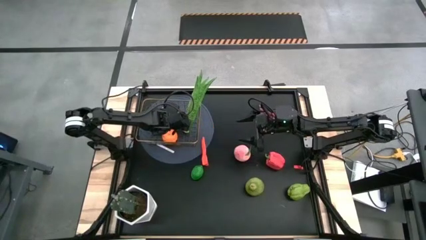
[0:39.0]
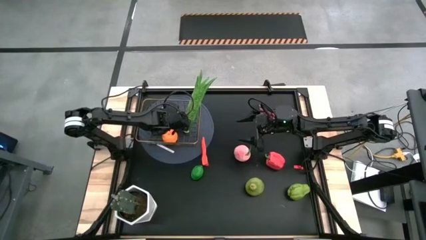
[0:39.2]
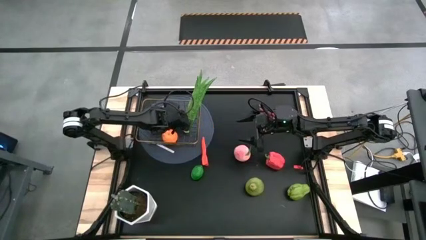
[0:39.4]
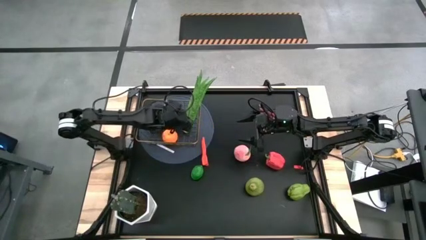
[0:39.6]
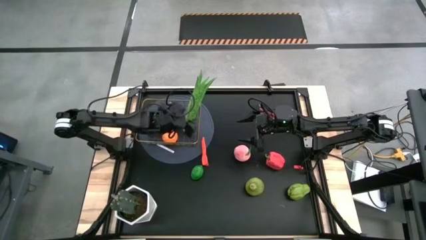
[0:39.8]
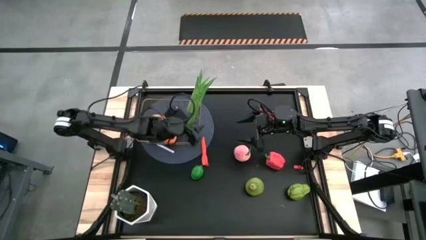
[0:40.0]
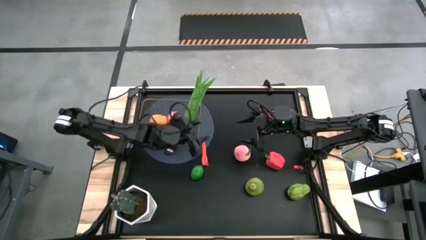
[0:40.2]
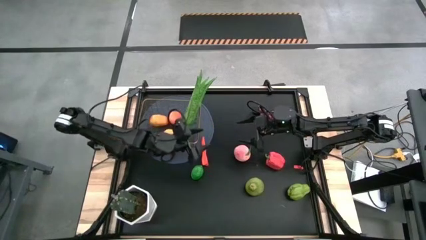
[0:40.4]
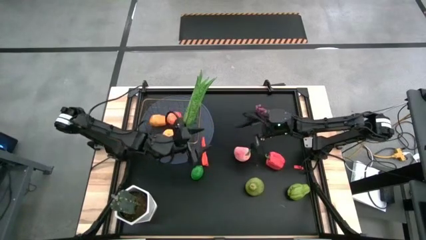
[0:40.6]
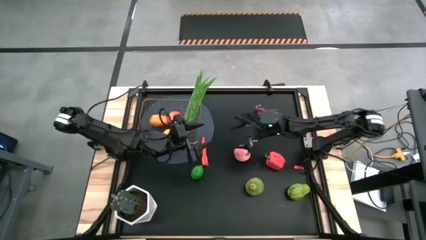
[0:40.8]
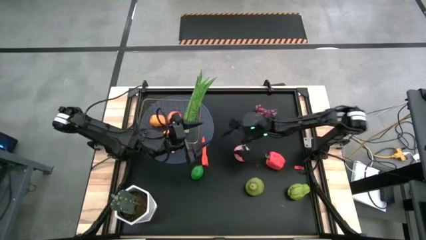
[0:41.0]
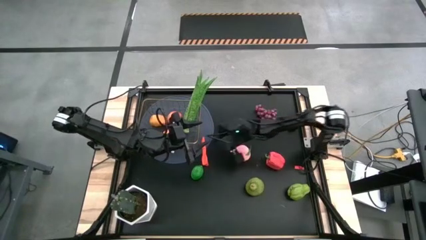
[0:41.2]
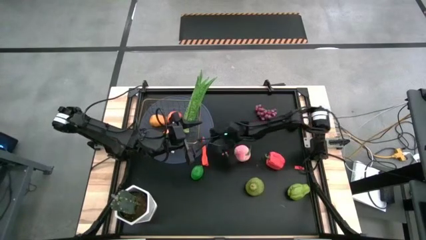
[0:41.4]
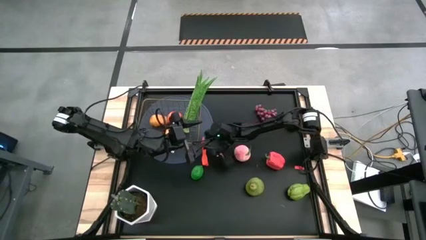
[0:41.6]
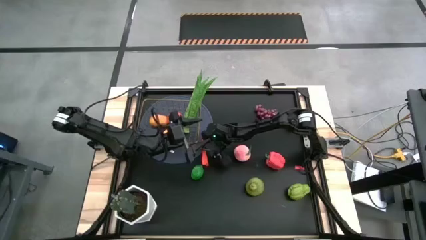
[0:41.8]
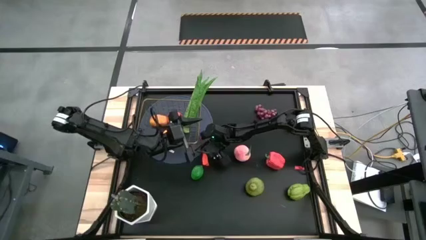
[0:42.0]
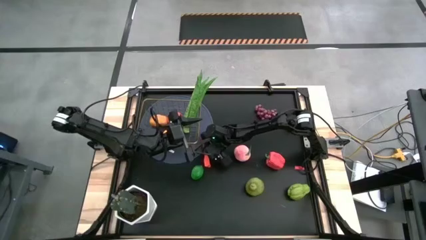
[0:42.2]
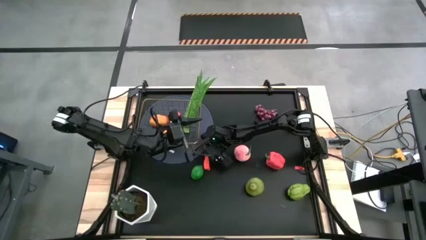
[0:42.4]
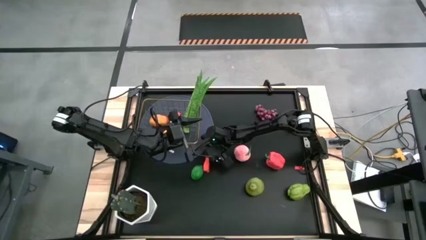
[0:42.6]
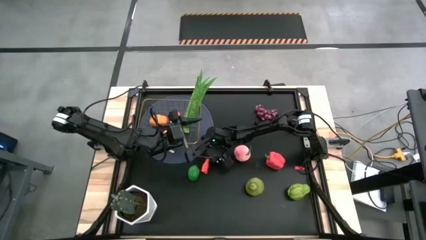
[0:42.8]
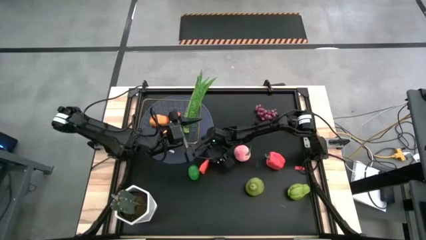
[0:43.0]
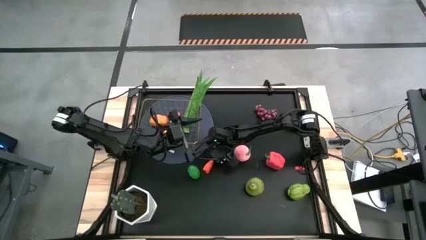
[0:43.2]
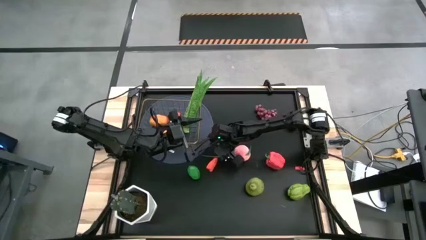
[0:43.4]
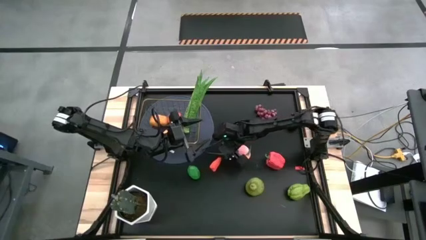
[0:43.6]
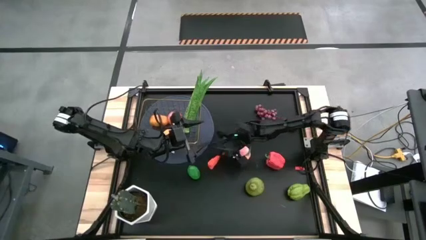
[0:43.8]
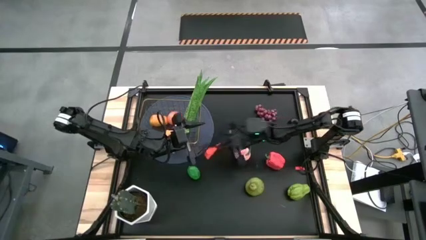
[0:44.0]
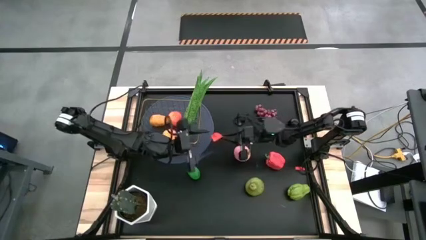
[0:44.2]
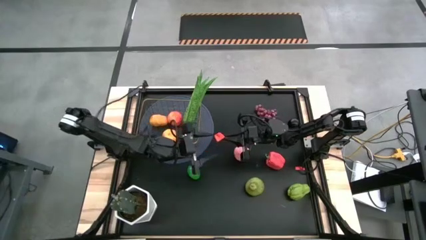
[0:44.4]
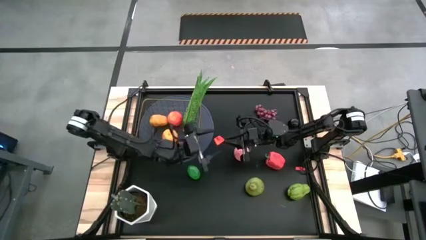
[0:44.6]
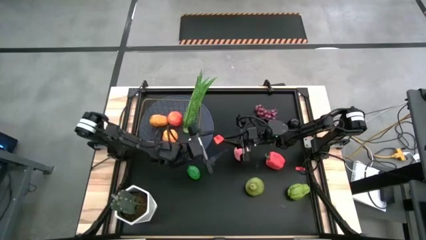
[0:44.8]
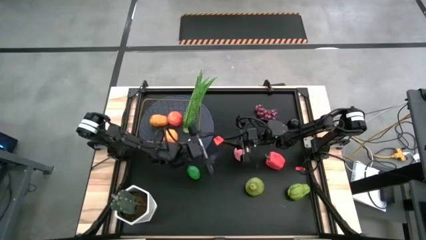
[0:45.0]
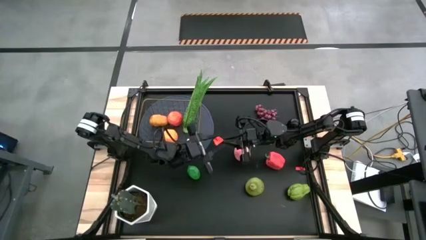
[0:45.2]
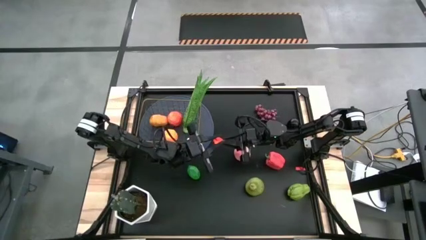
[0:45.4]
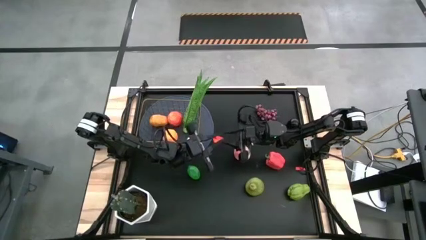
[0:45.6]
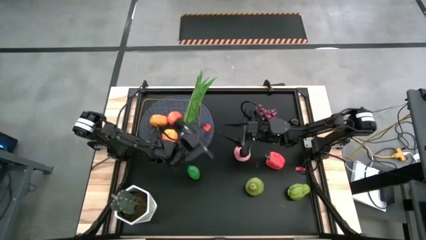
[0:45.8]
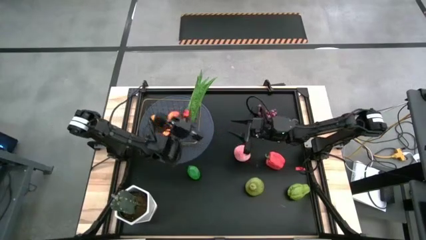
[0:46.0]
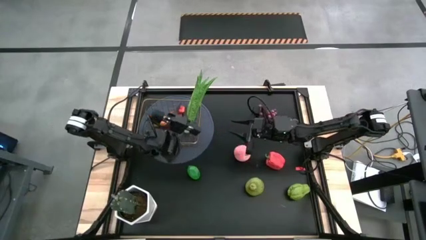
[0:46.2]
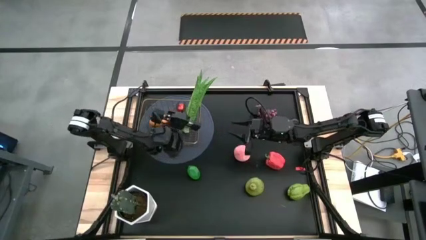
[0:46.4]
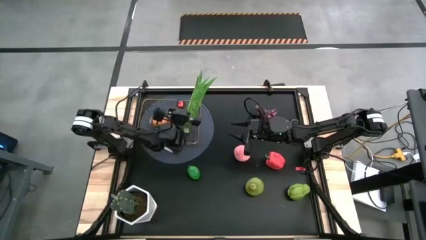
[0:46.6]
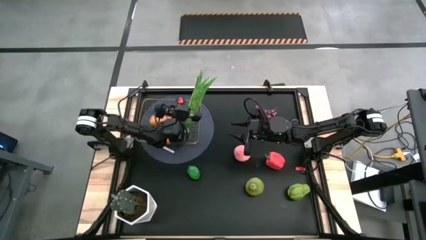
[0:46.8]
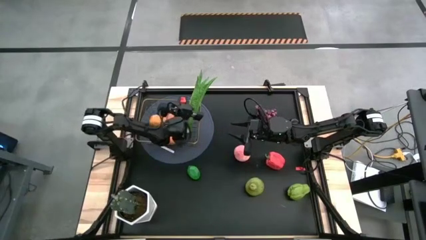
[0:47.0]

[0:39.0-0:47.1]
Task: Build produce basket
Put the red chili pepper into the wire basket

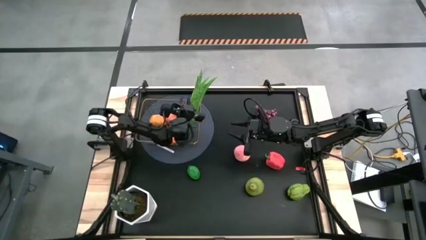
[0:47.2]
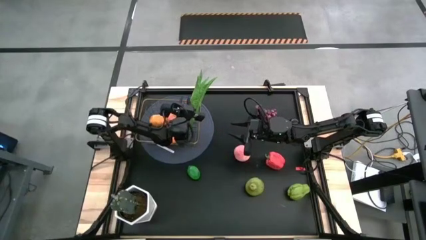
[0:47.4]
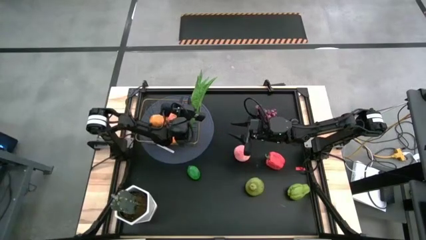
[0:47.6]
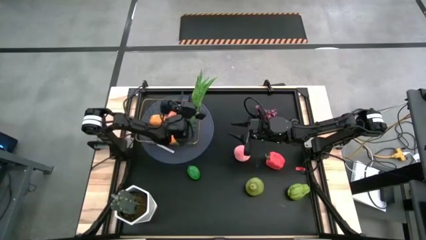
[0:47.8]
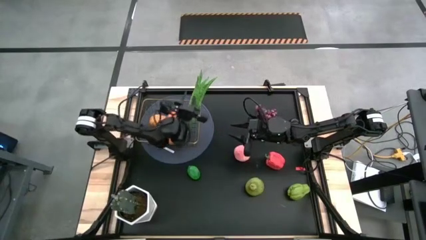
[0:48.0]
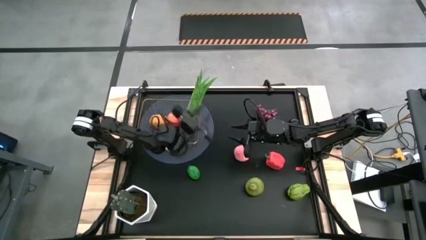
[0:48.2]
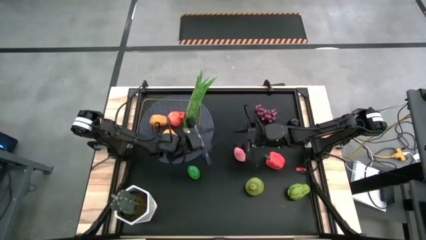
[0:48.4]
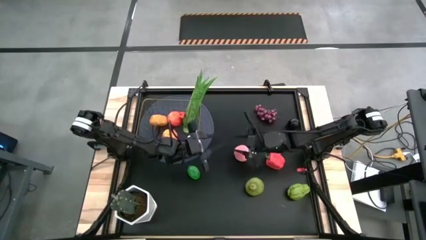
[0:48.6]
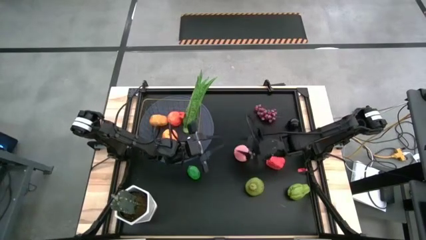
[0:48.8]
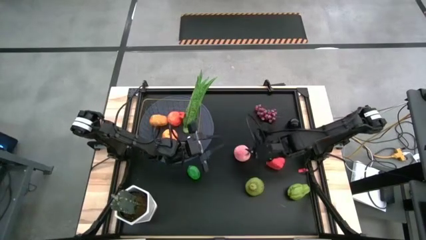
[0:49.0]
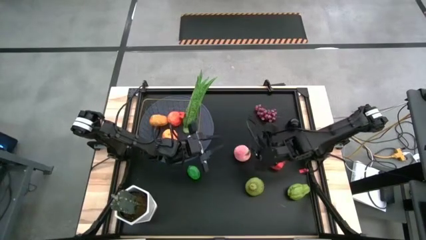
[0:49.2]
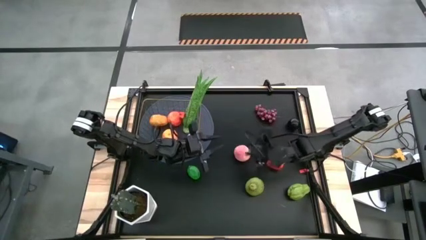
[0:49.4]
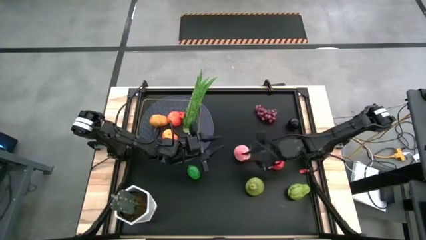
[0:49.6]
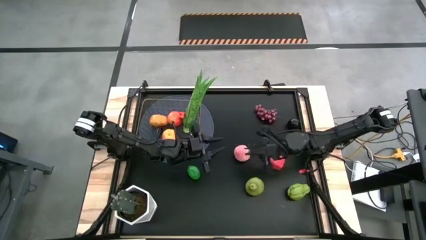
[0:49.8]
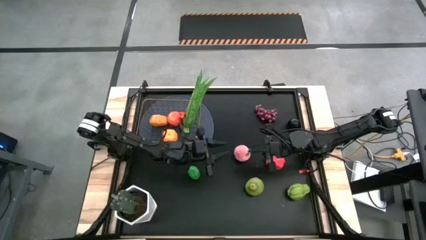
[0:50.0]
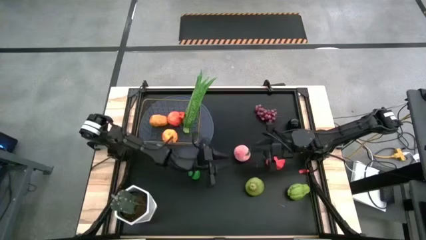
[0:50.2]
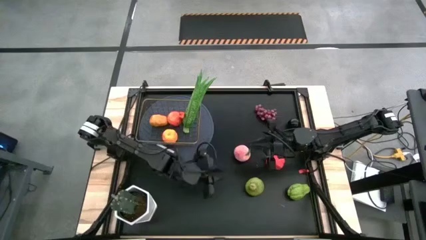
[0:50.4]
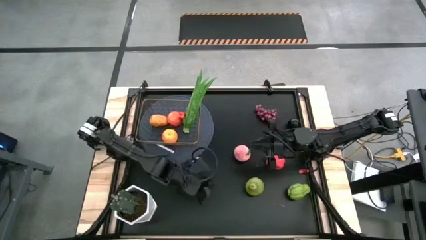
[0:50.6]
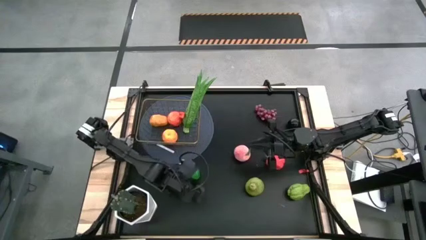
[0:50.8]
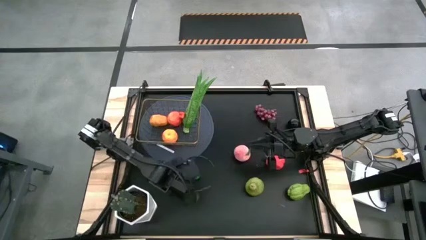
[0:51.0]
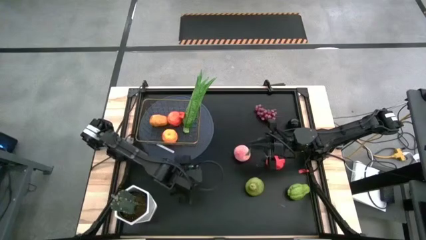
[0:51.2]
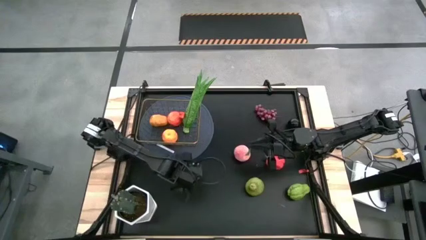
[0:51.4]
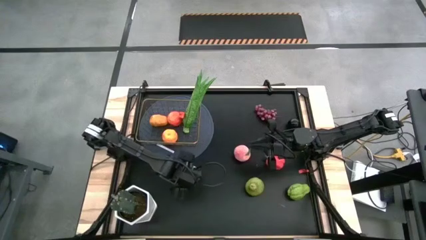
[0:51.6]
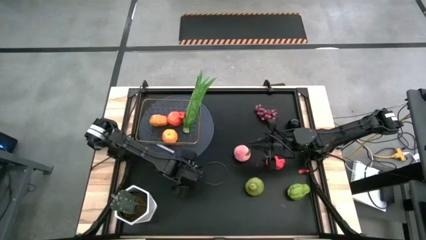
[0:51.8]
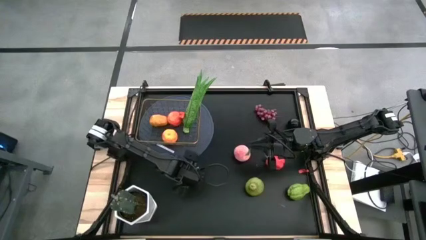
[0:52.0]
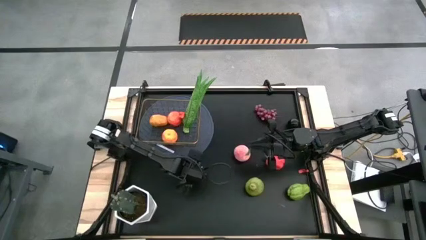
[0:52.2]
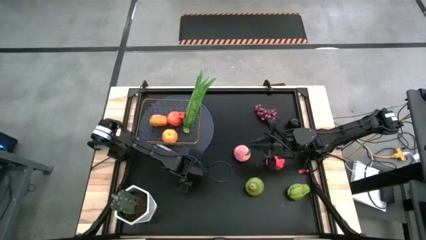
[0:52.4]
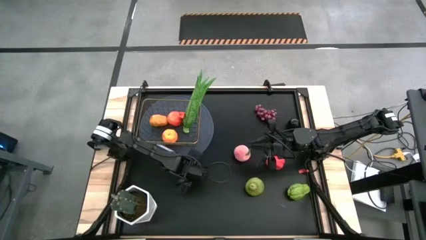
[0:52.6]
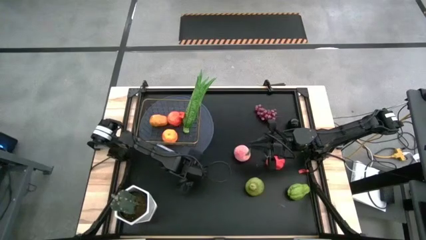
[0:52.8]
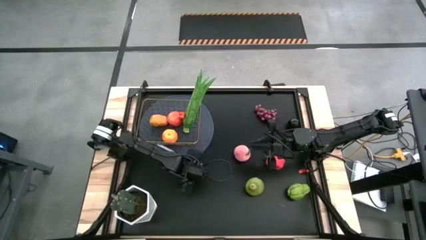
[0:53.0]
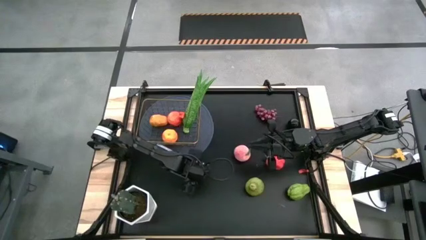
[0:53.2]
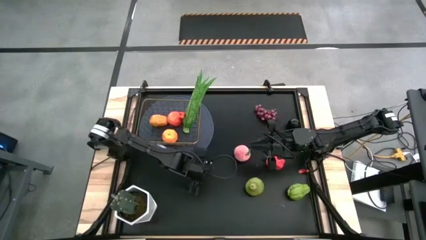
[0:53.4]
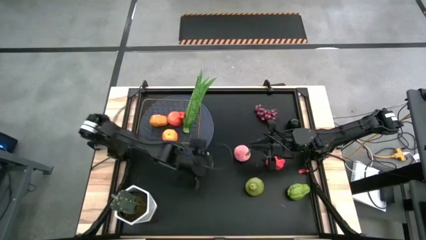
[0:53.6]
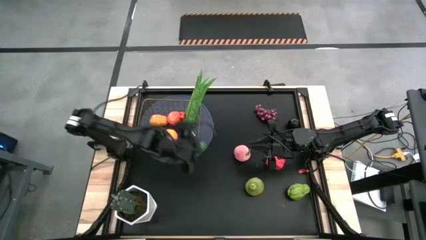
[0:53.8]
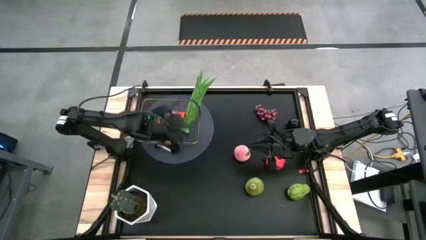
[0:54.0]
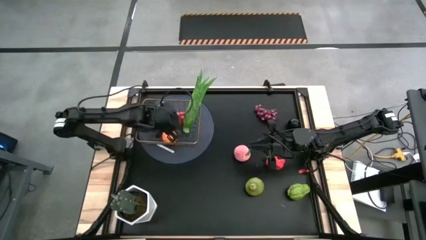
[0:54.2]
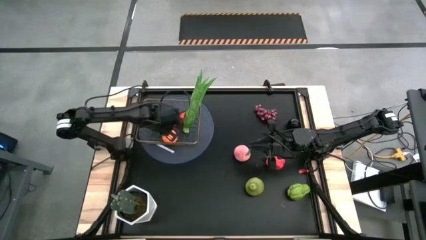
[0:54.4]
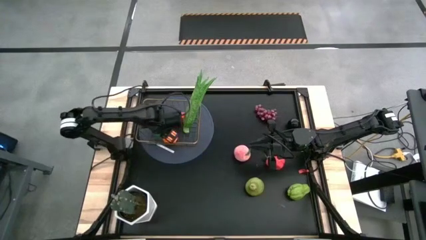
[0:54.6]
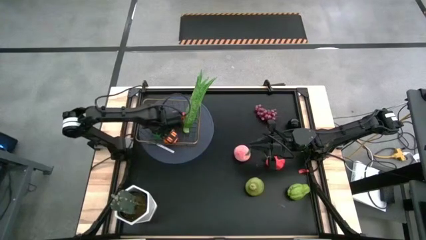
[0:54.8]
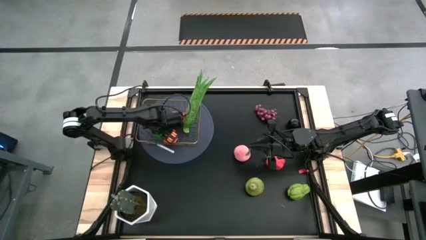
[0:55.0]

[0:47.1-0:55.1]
Put the green lime into the wire basket
